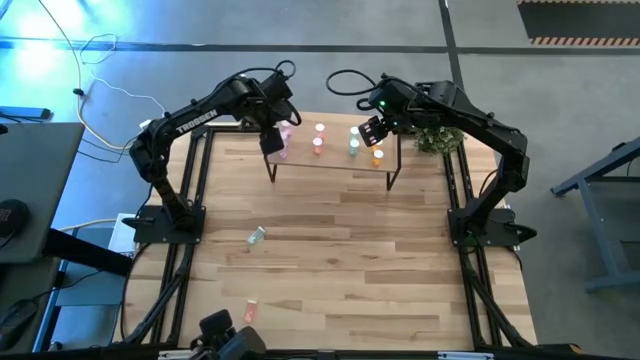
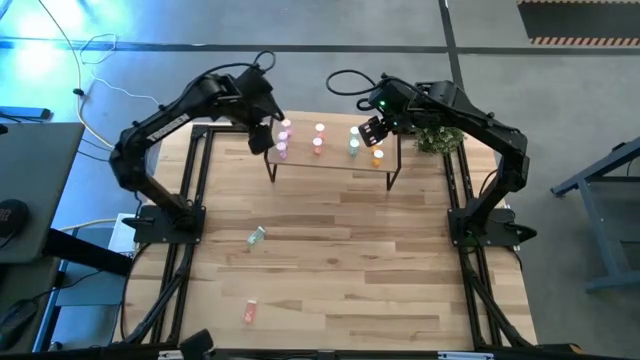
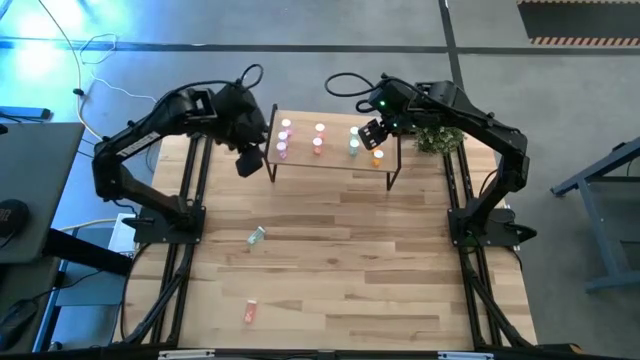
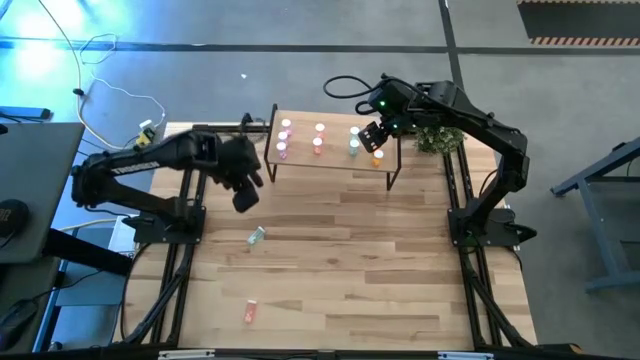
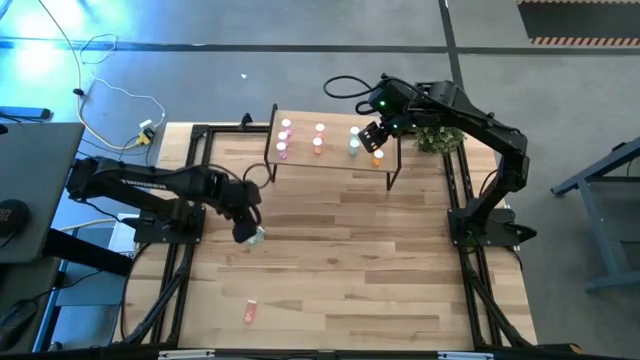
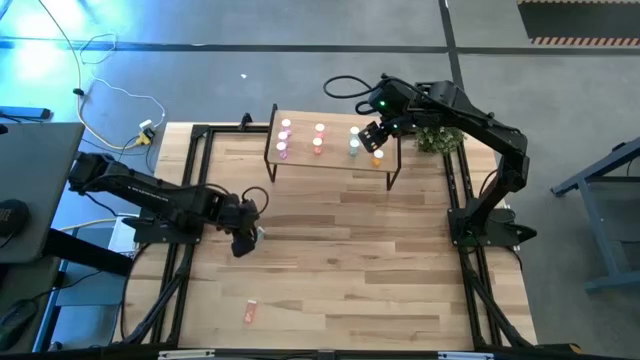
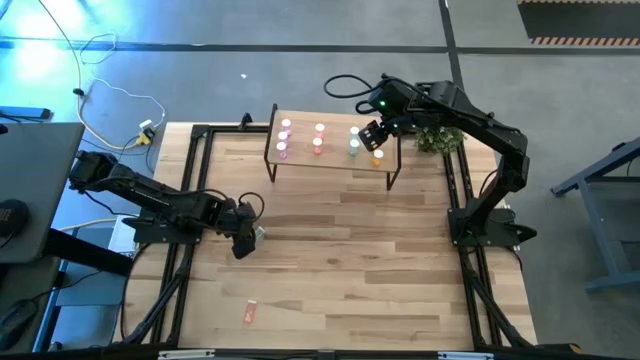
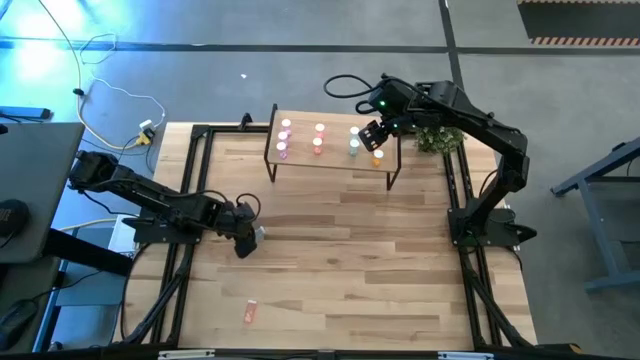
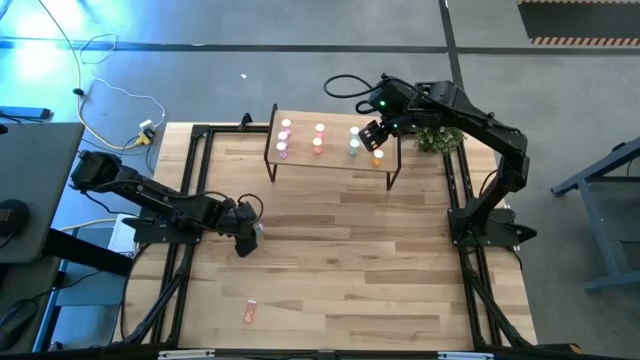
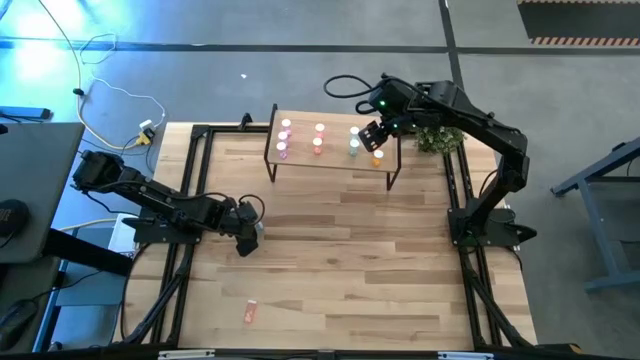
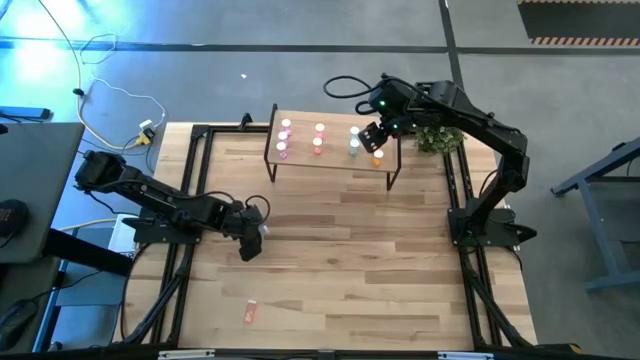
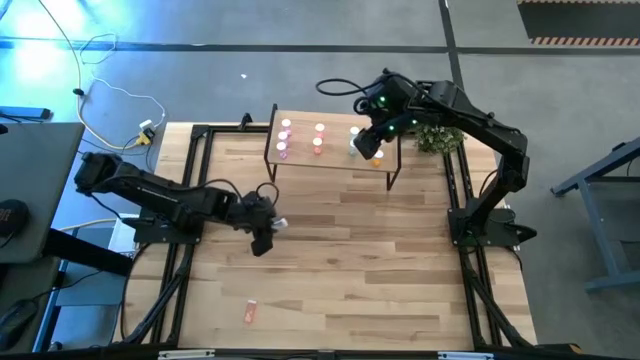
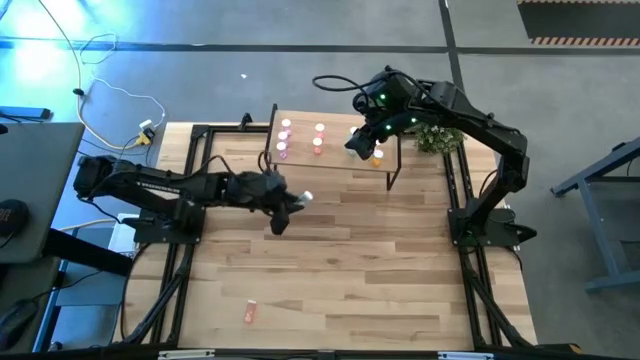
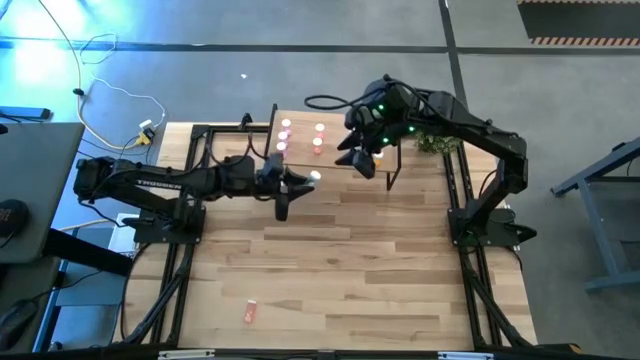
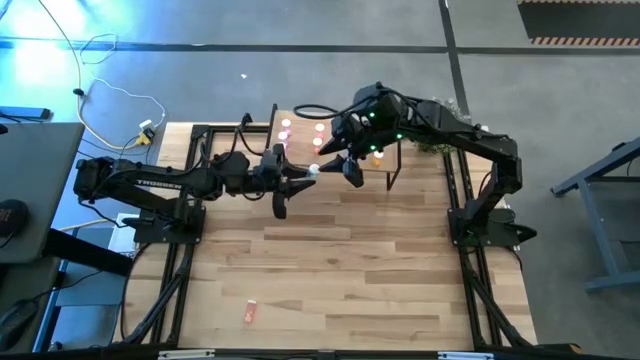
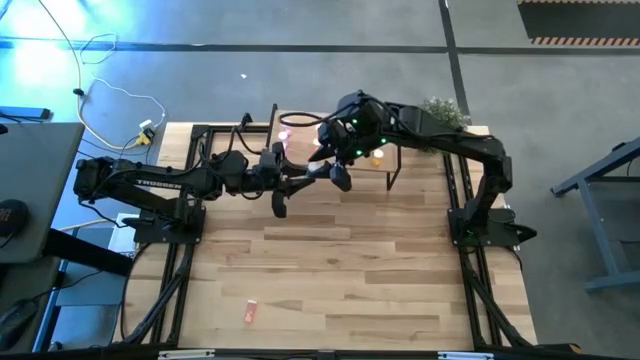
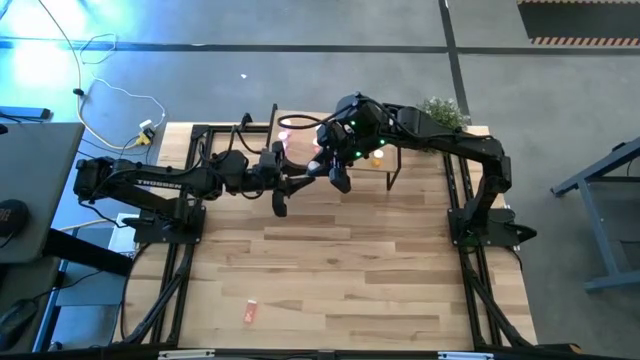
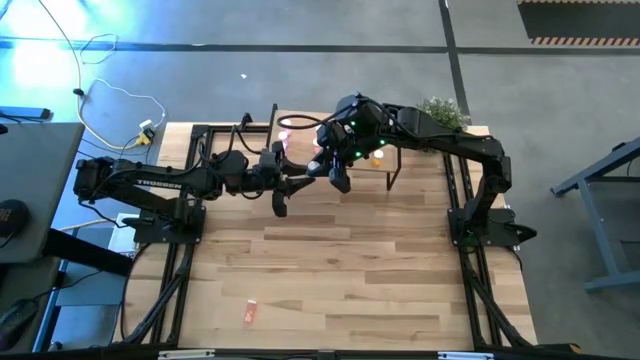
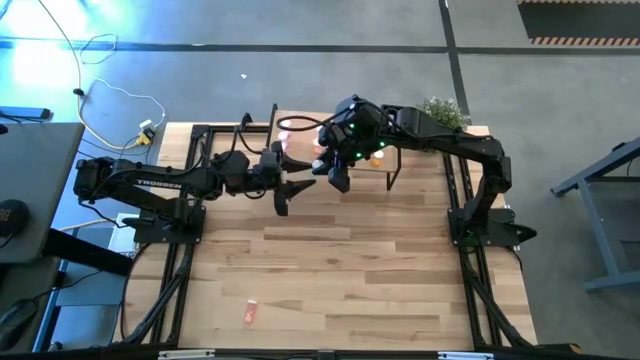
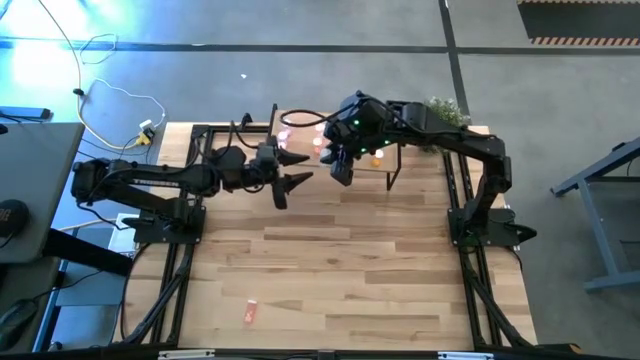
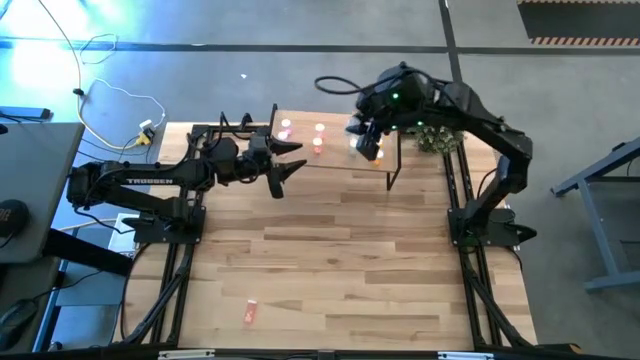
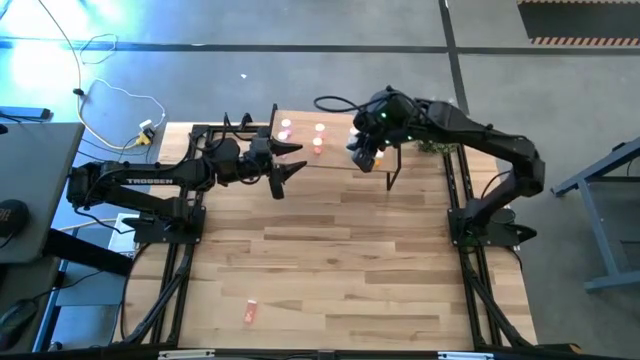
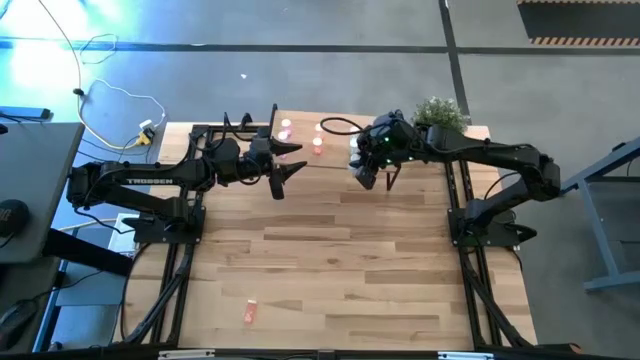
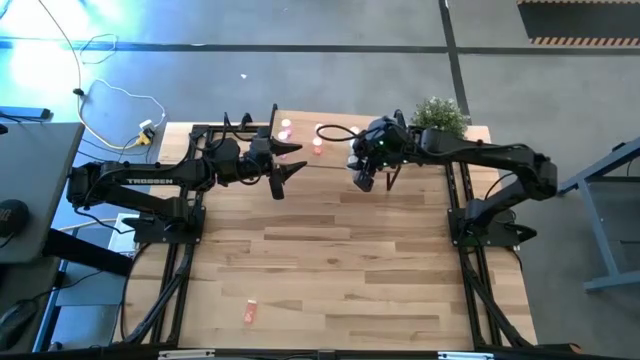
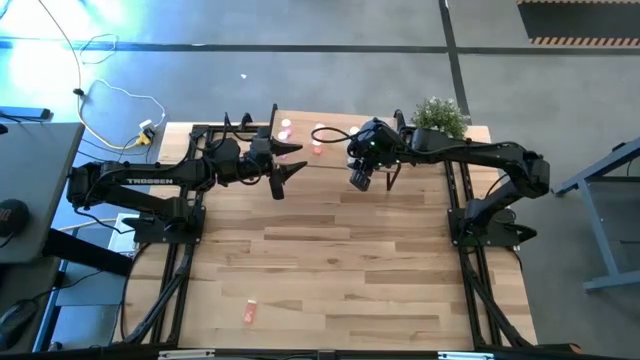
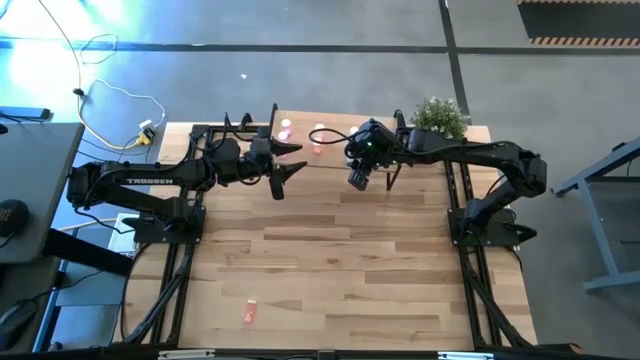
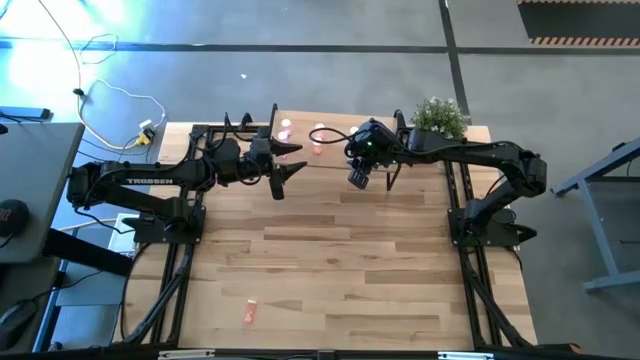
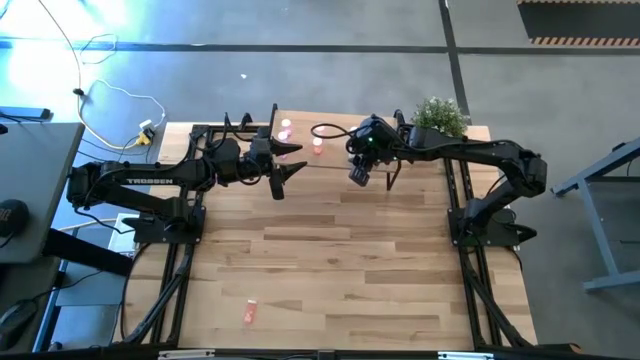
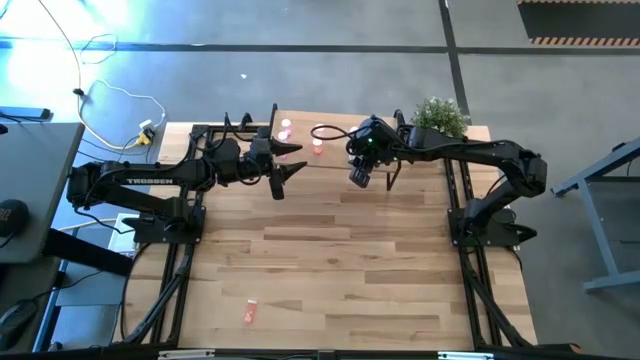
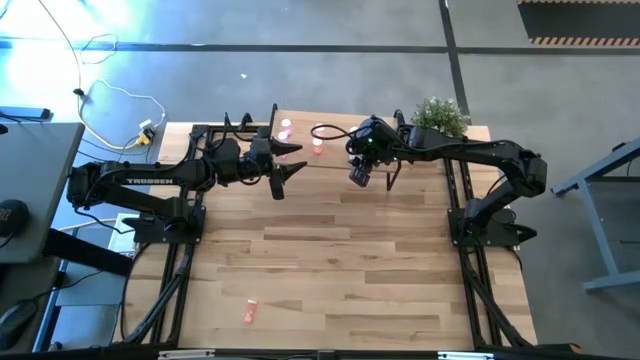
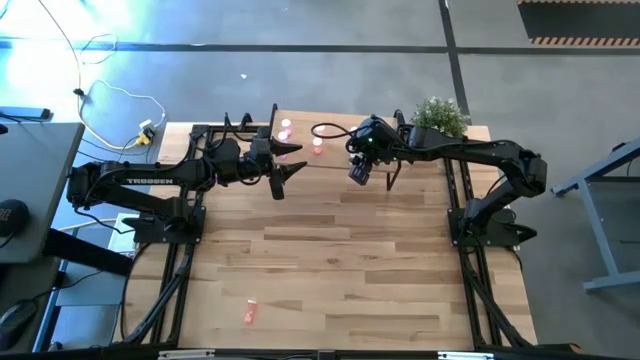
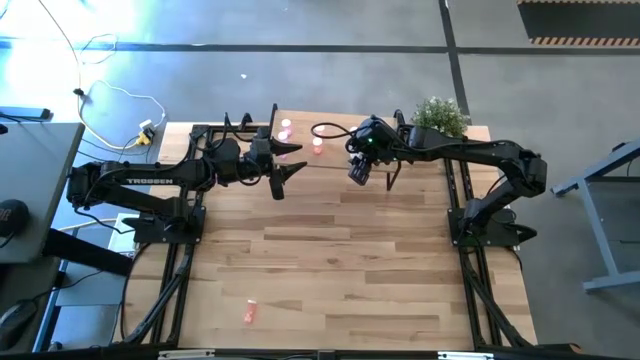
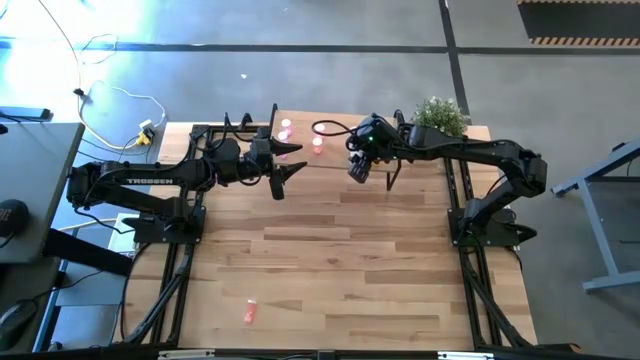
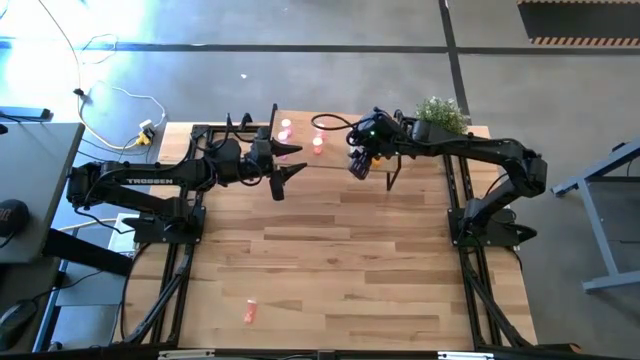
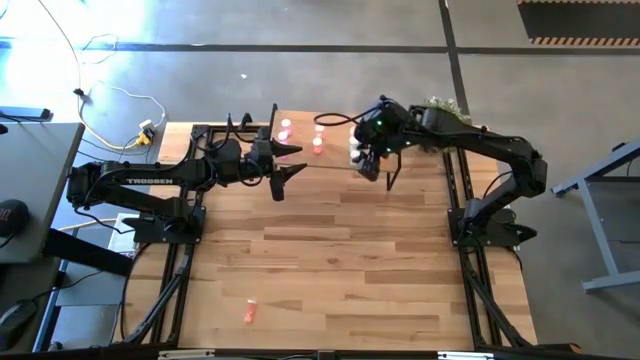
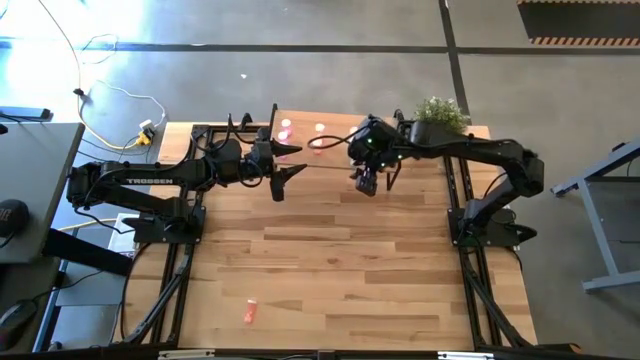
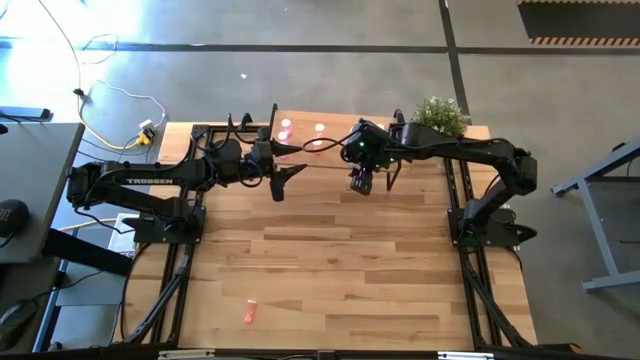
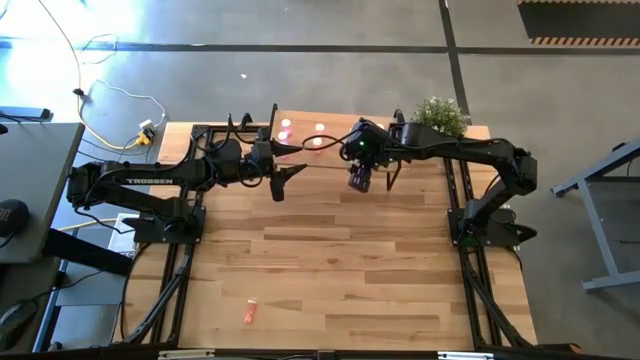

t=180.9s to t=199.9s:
Task: Pick and place medicine bottles onto shelf by color
Put the blue pill bottle aligned with the other blue pill bottles on the shelf

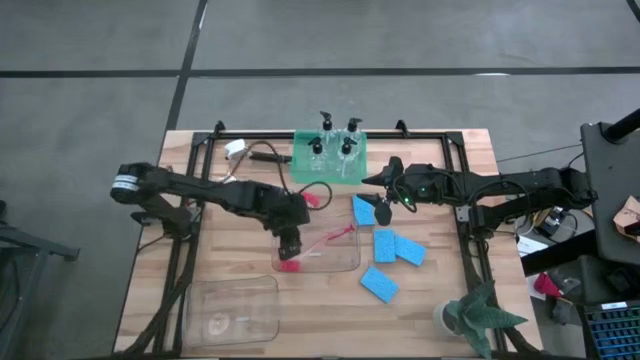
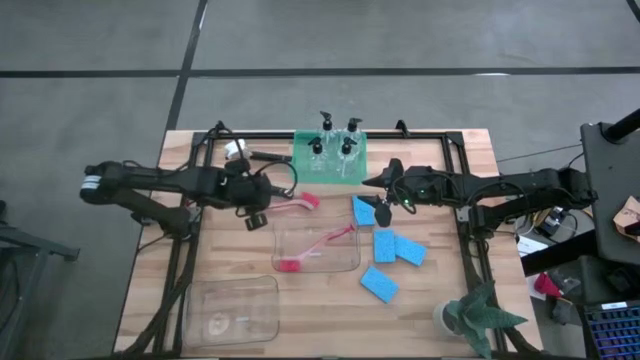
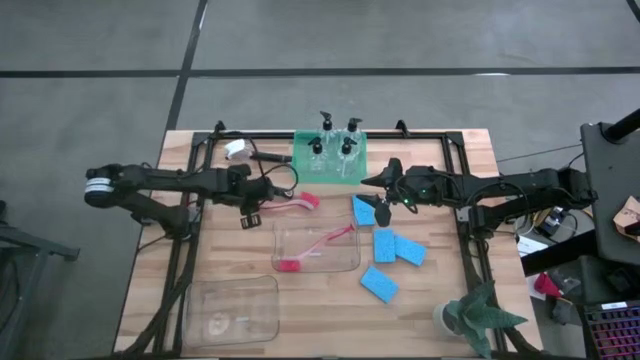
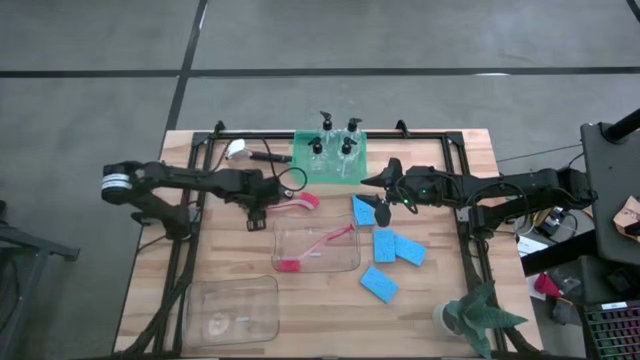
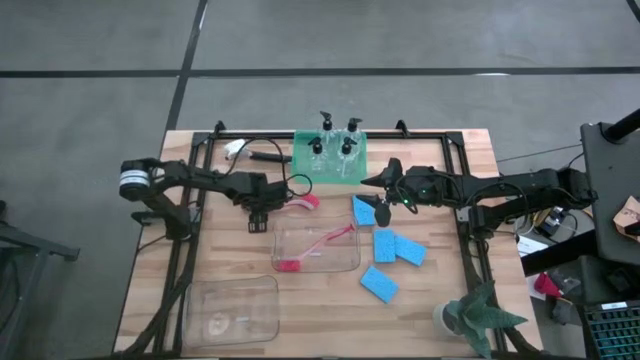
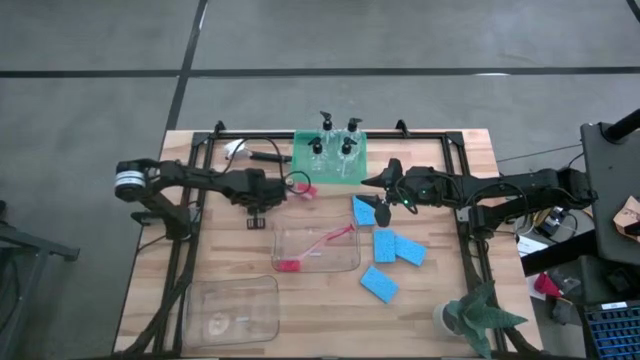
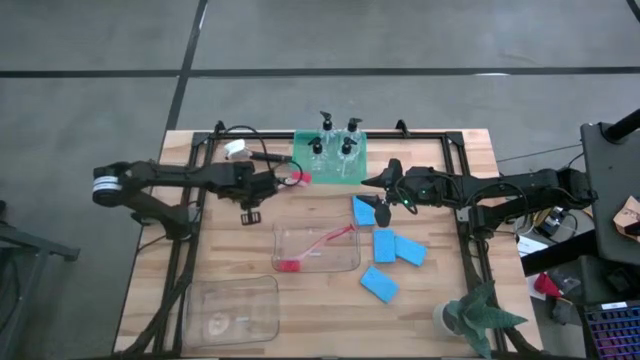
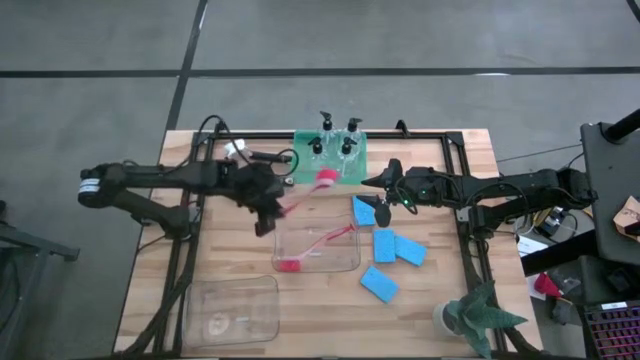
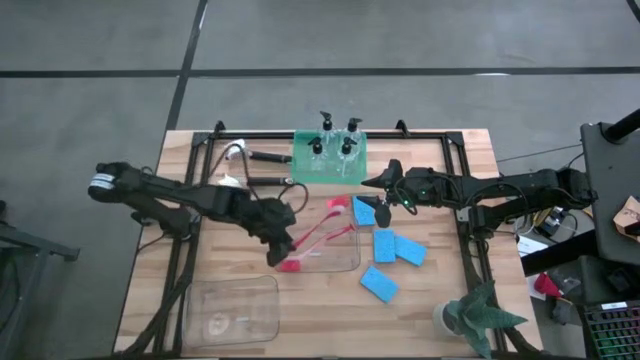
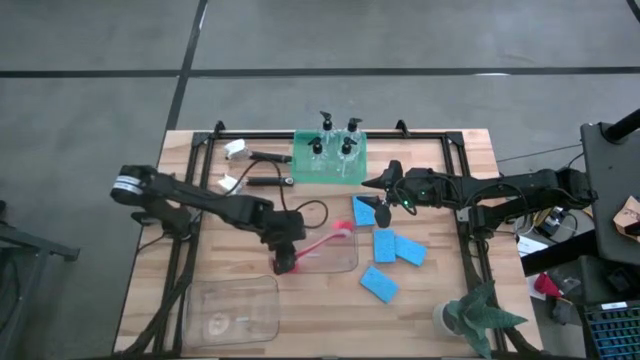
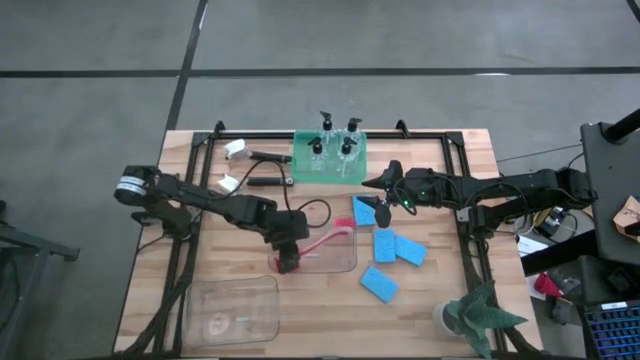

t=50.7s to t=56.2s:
Task: Pick & Place Kitchen Sink Supplies
Put the pink dish brush into the top transparent bin
